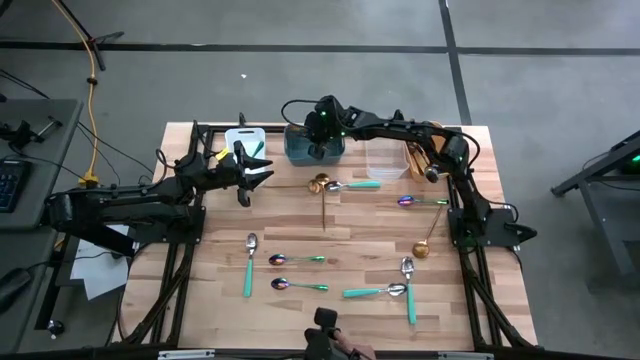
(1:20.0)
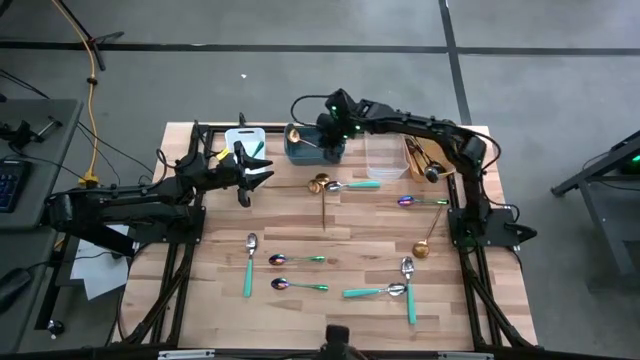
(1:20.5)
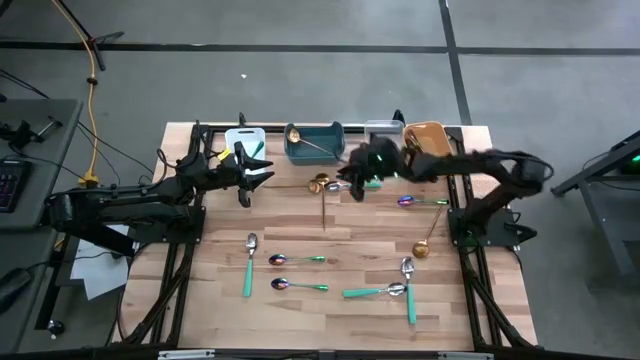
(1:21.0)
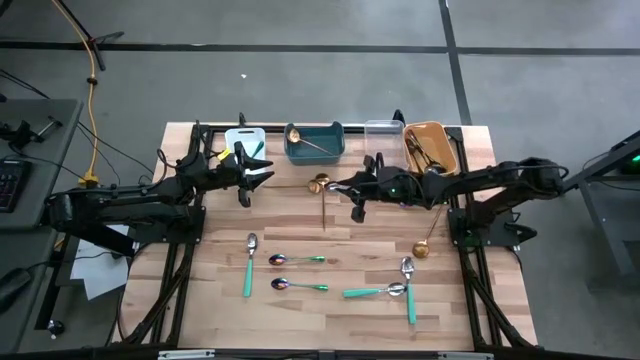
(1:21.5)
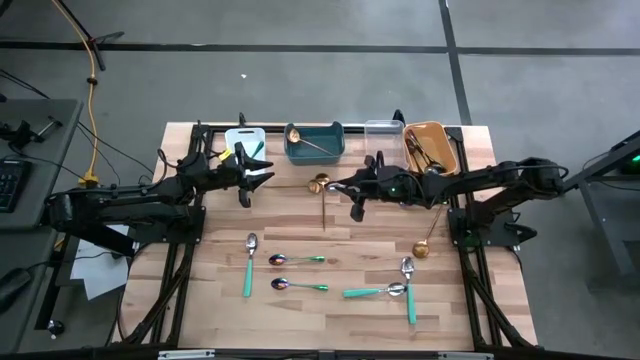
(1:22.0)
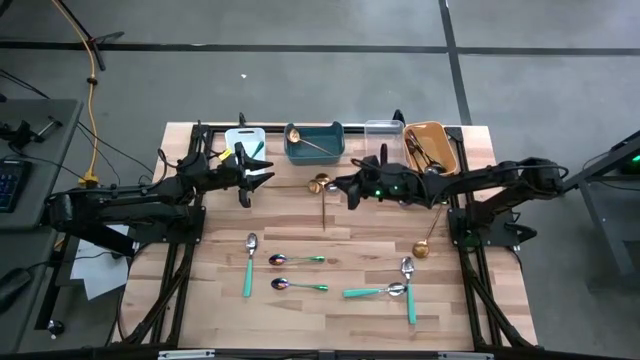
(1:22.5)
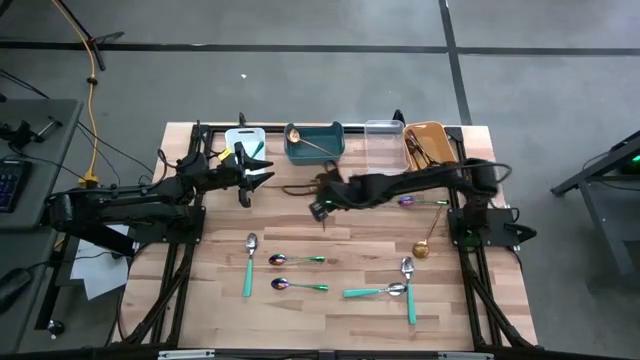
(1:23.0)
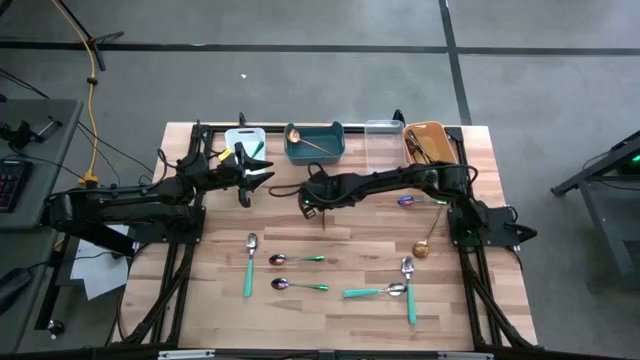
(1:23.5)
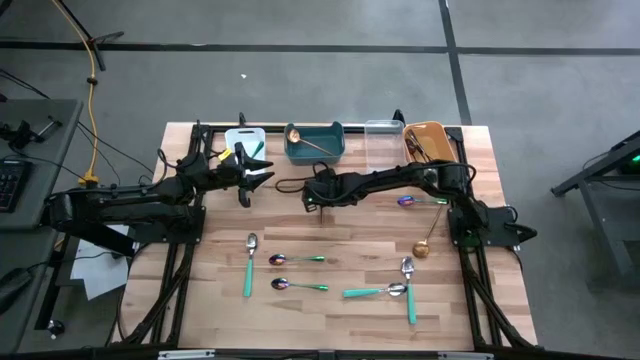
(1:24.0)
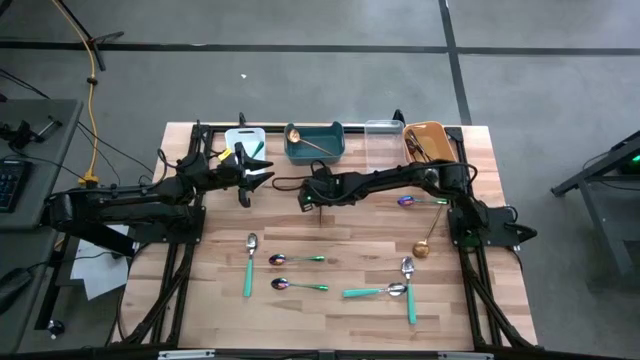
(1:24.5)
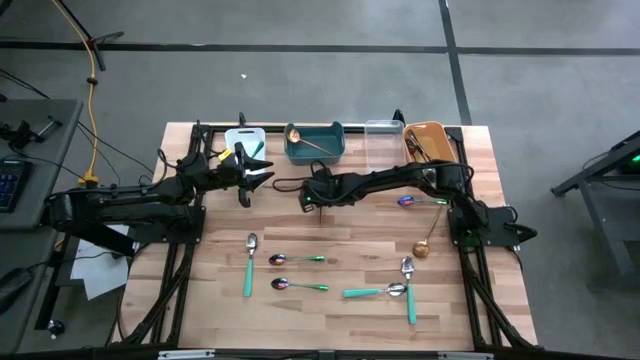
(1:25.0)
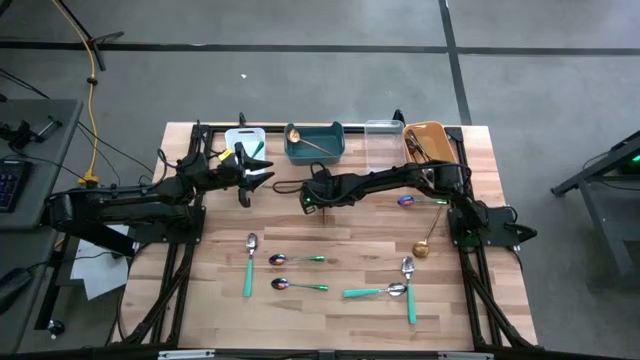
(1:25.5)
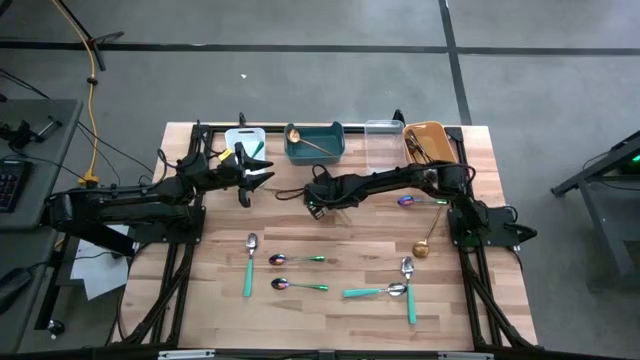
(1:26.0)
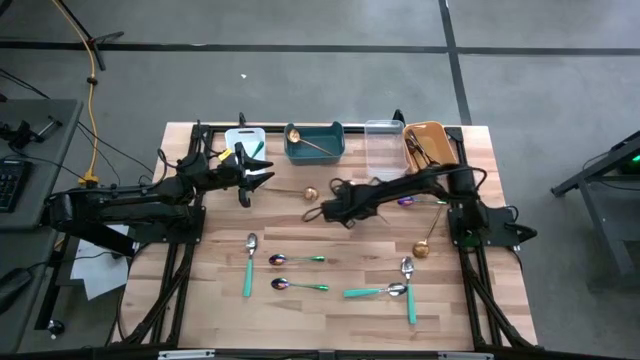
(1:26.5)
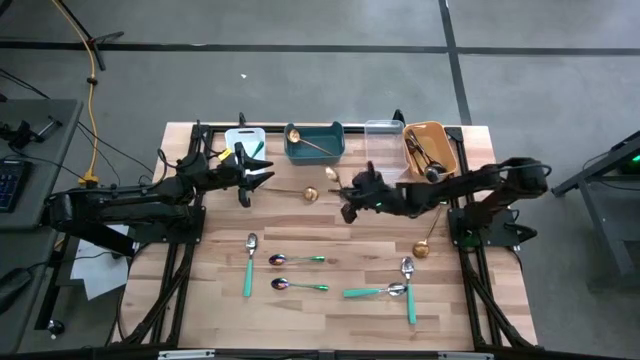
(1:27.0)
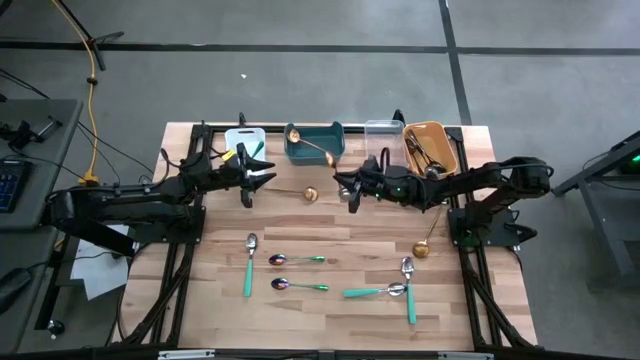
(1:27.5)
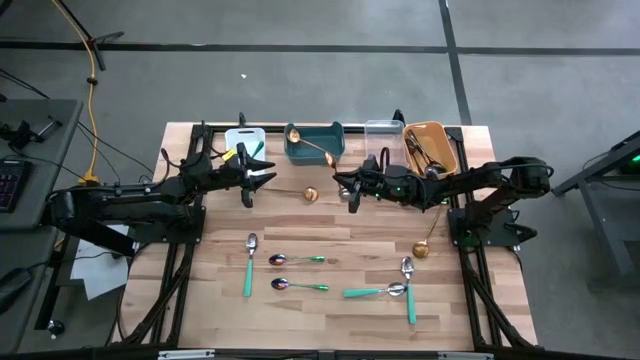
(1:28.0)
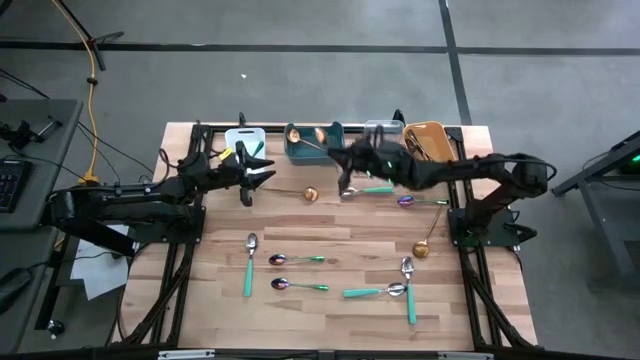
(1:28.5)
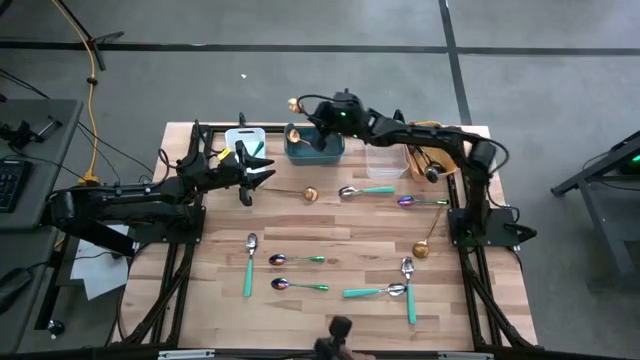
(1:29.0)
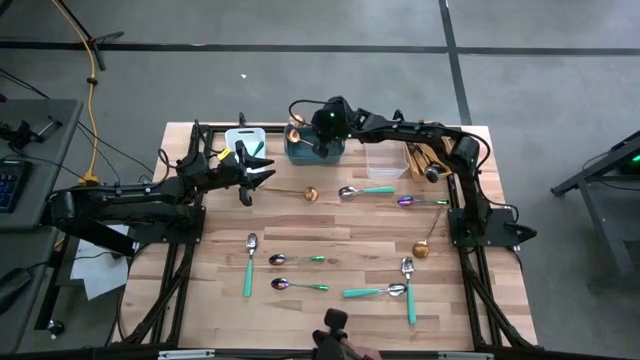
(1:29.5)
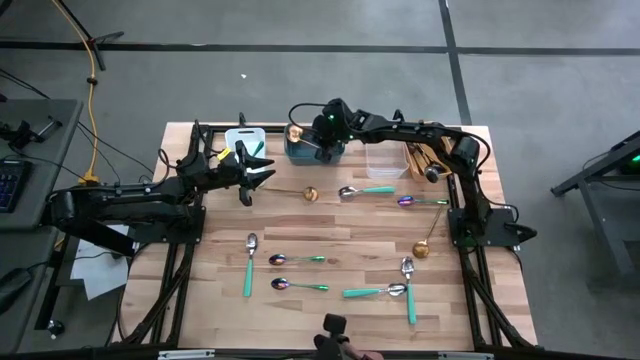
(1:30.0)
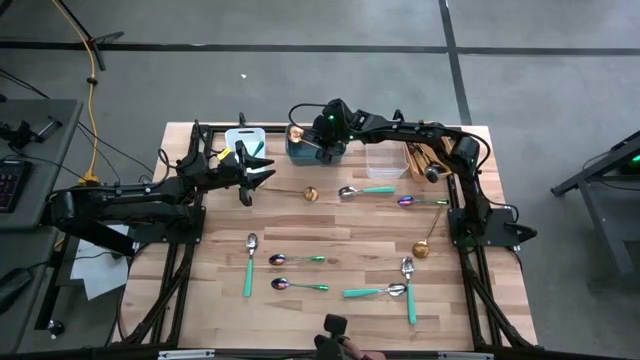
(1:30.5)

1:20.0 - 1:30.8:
Task: Sort silverware by color (type)
Put the gold spoon into the blue bin

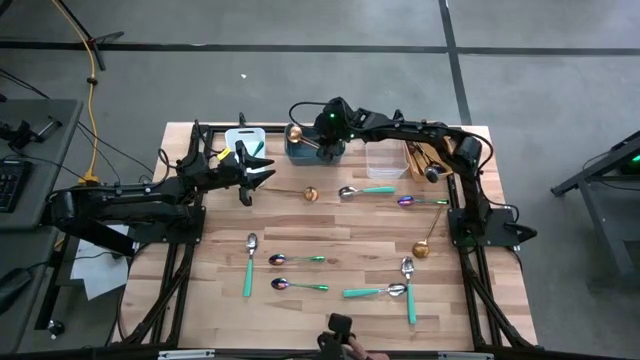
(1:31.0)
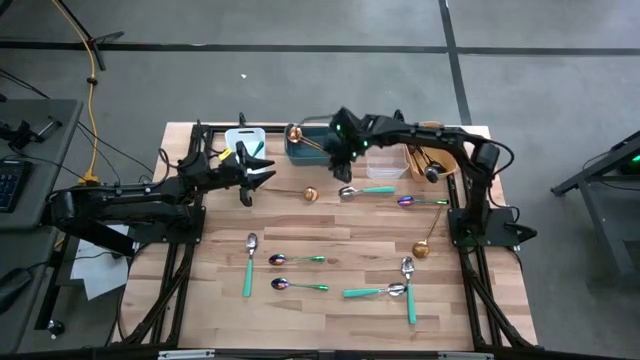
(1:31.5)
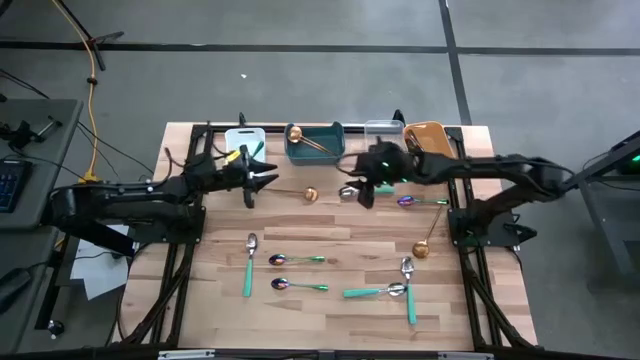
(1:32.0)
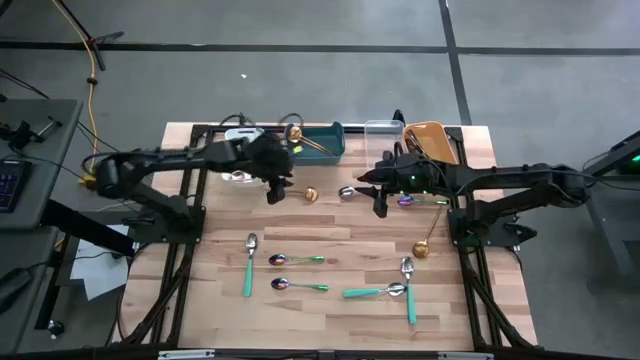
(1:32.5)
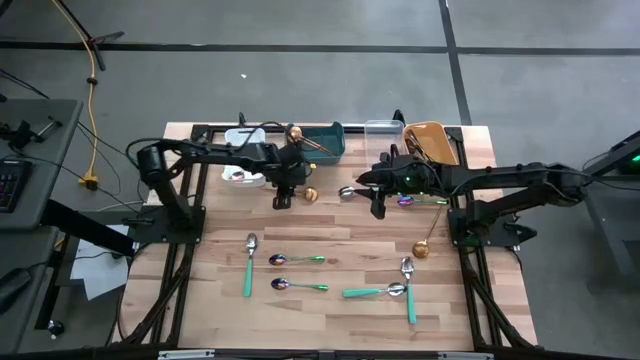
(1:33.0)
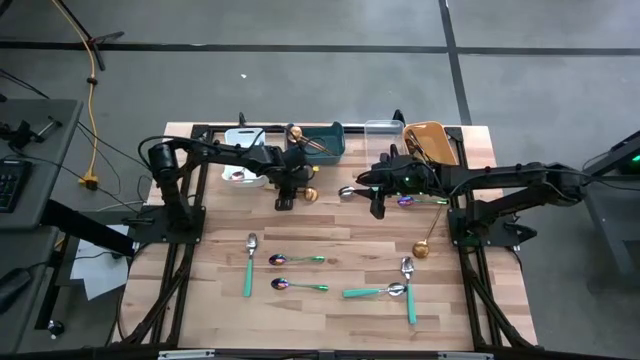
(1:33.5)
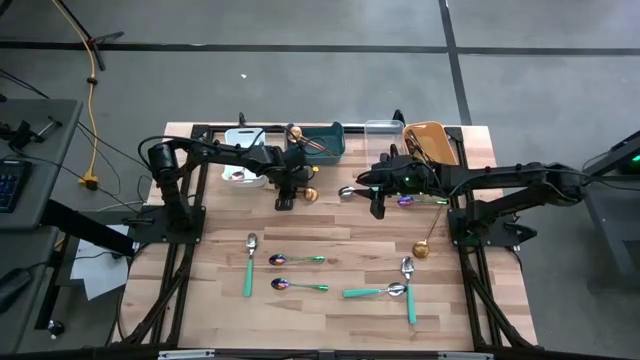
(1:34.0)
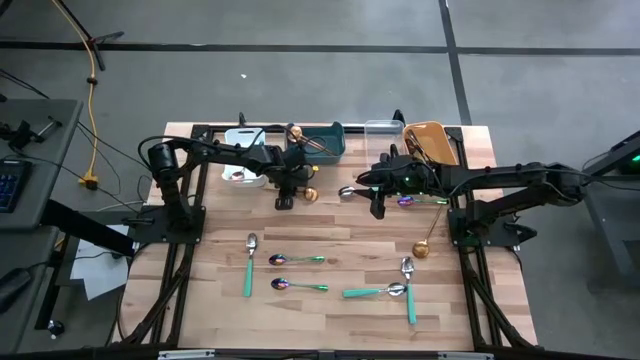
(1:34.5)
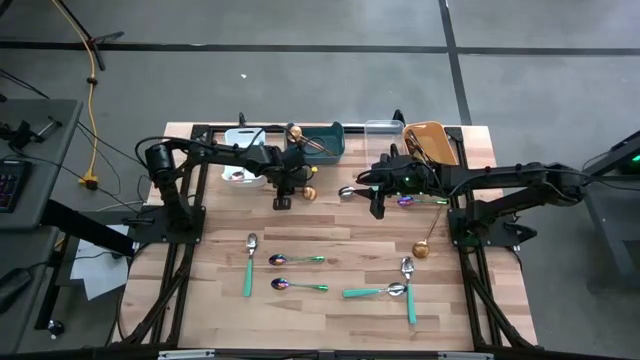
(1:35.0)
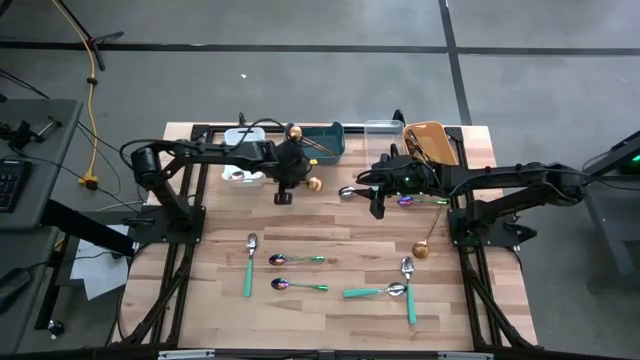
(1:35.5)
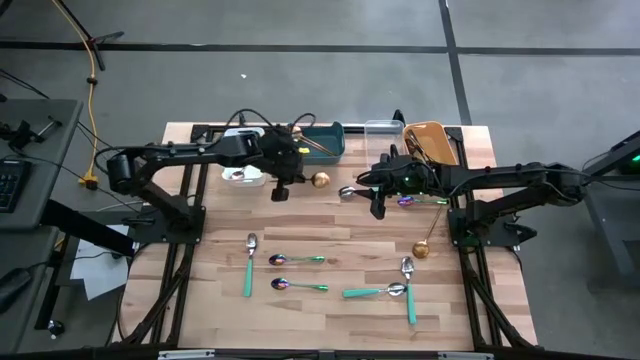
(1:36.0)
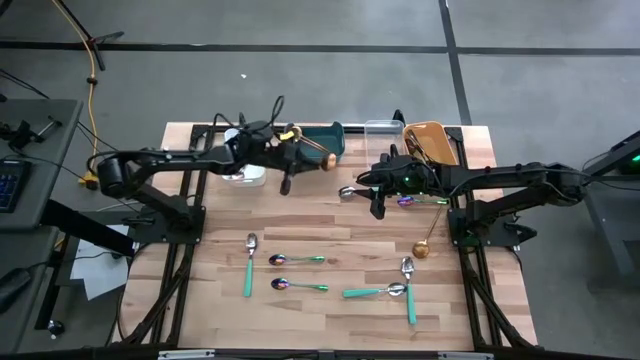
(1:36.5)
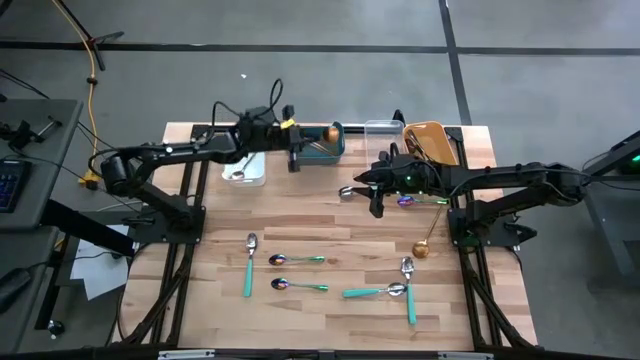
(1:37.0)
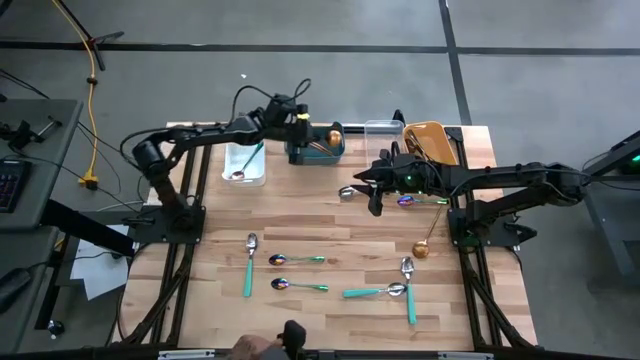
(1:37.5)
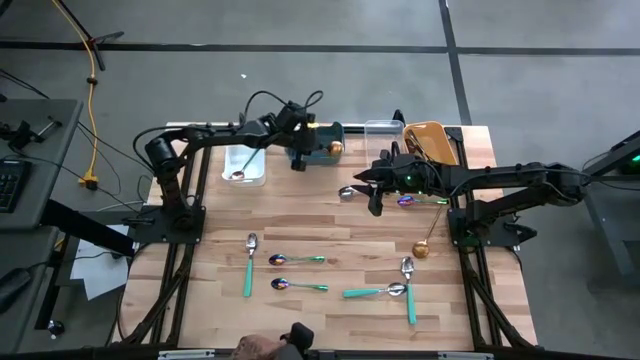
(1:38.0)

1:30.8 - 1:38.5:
Put the gold spoon into the blue bin

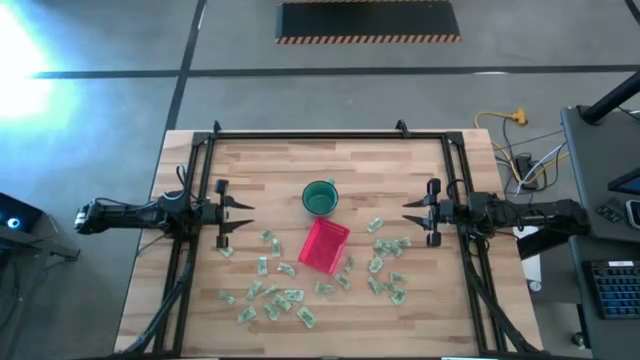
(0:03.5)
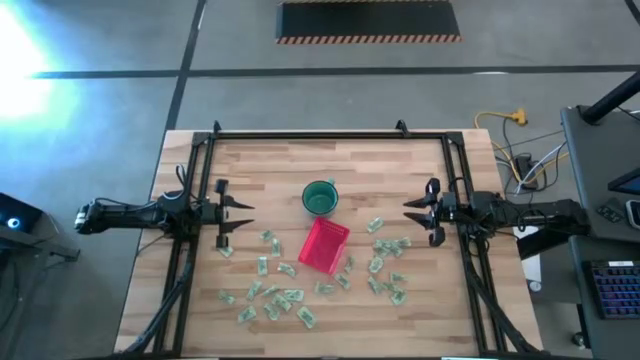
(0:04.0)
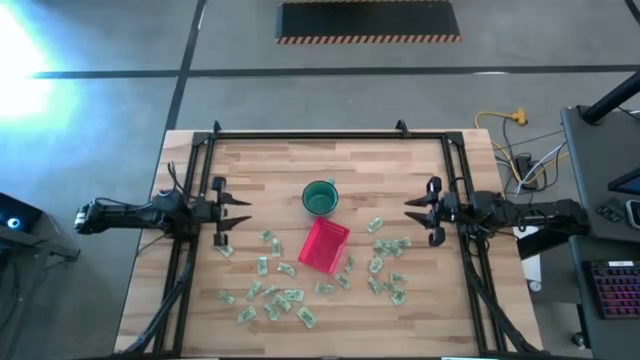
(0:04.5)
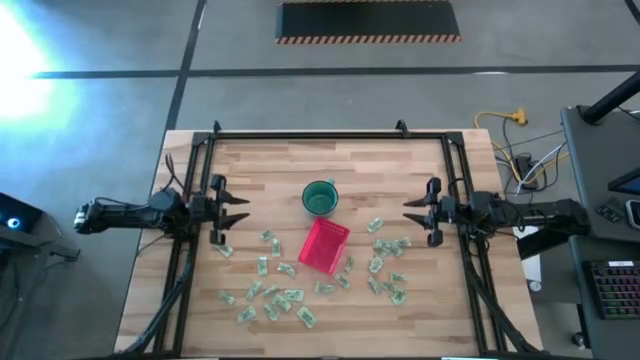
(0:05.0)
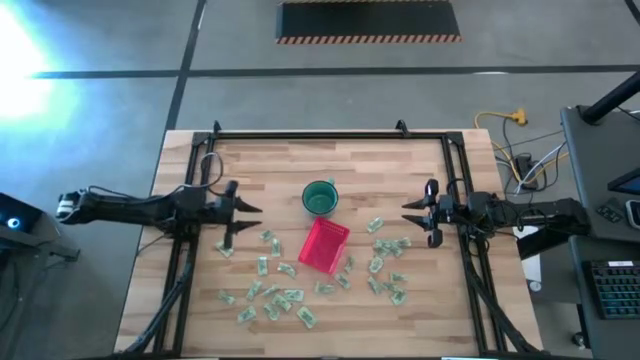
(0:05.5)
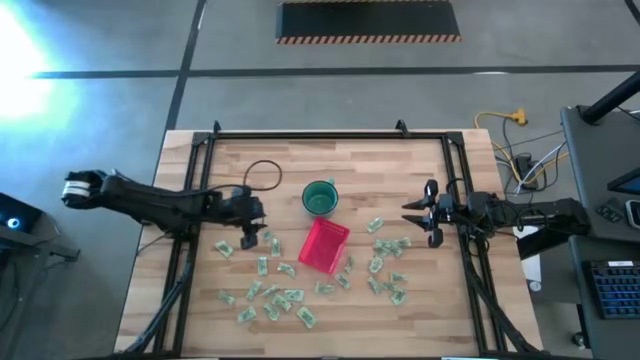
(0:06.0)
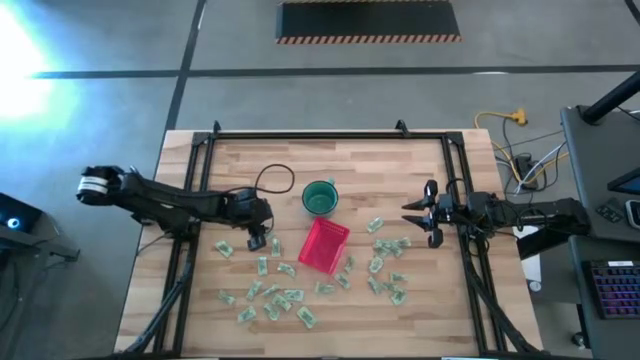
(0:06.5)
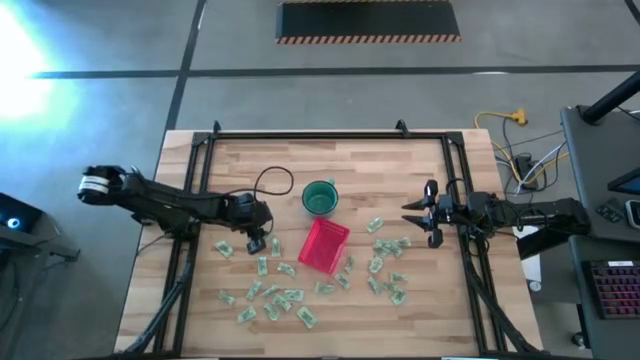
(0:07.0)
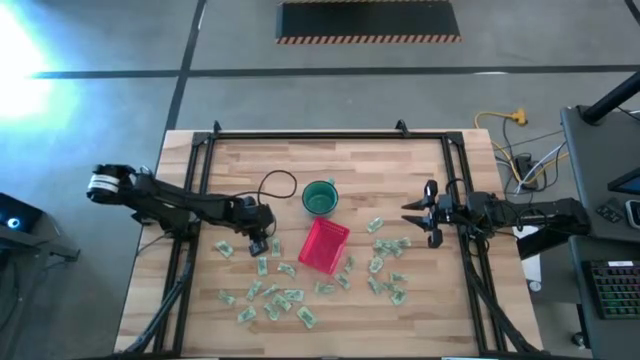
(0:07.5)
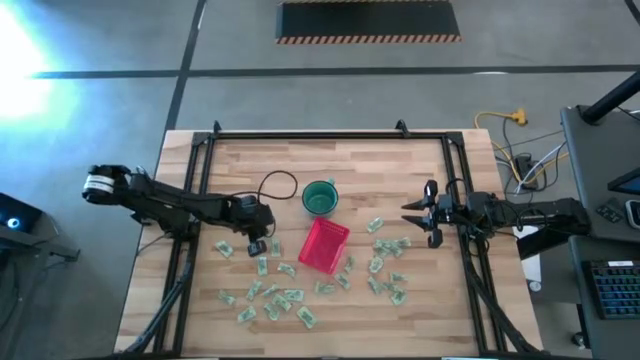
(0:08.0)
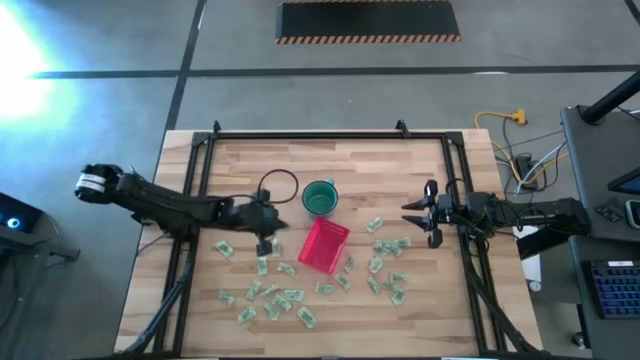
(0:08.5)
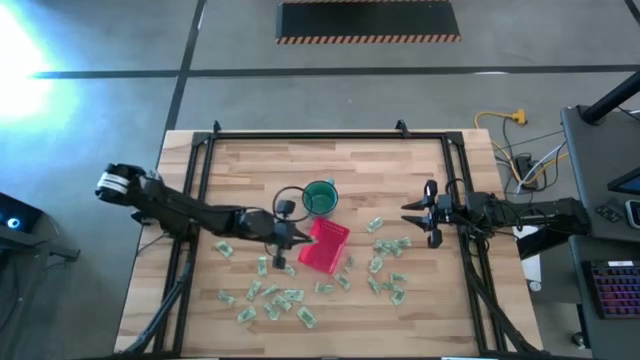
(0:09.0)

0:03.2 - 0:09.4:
Task: Pick and place items into bin
Put the light green stevia packet into the red bin
